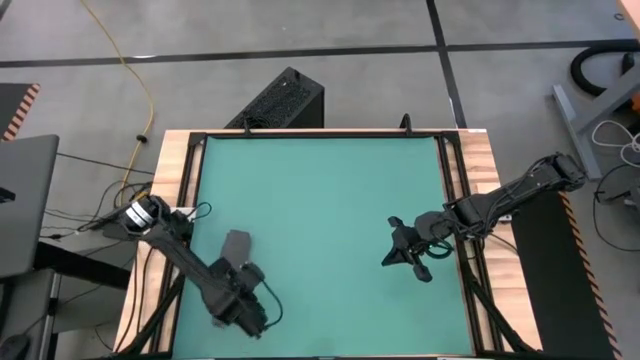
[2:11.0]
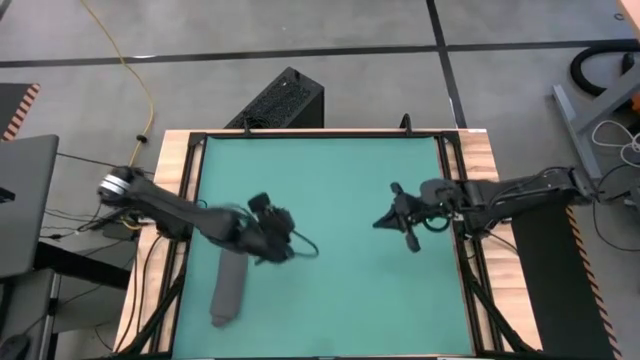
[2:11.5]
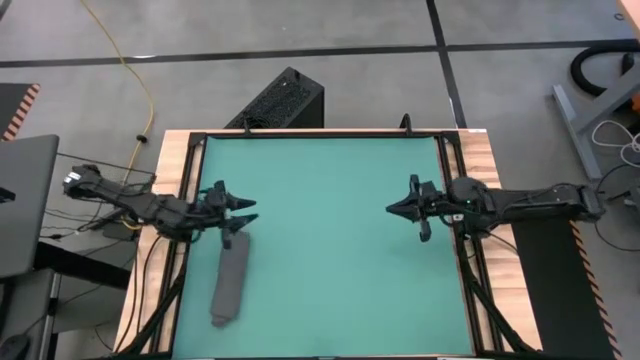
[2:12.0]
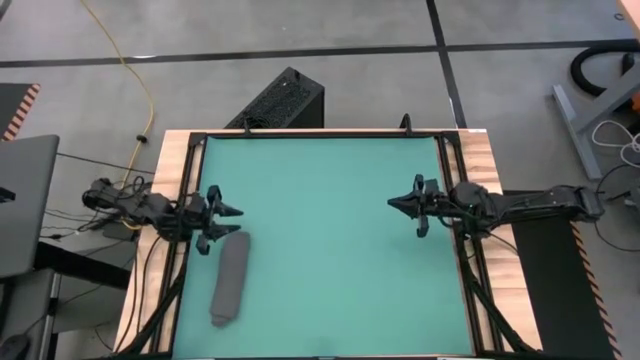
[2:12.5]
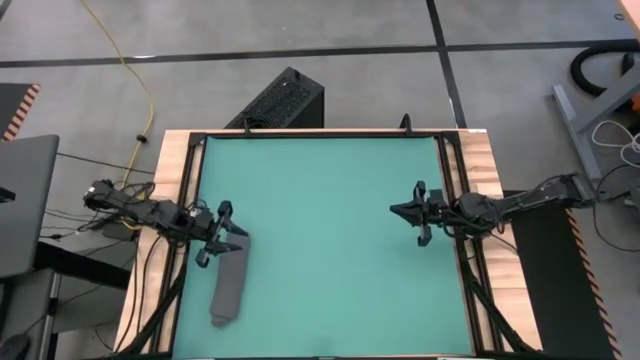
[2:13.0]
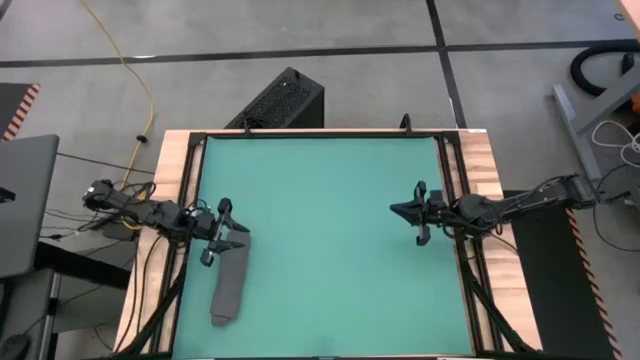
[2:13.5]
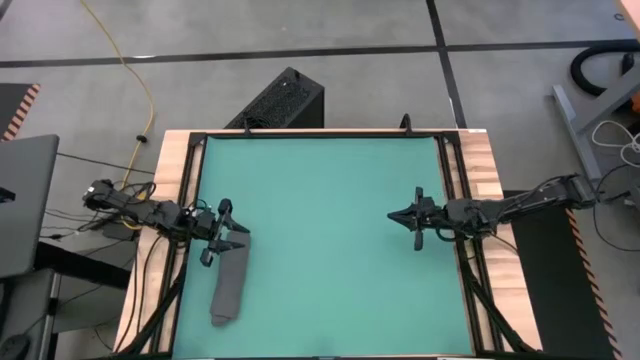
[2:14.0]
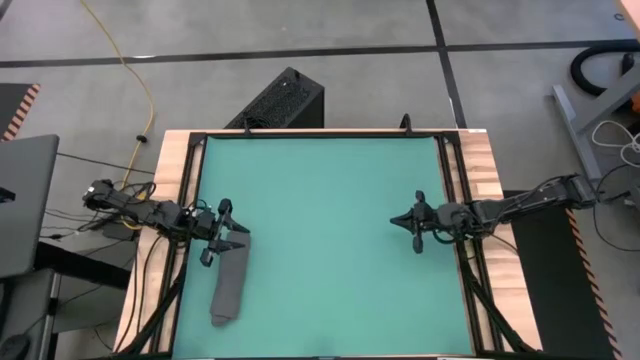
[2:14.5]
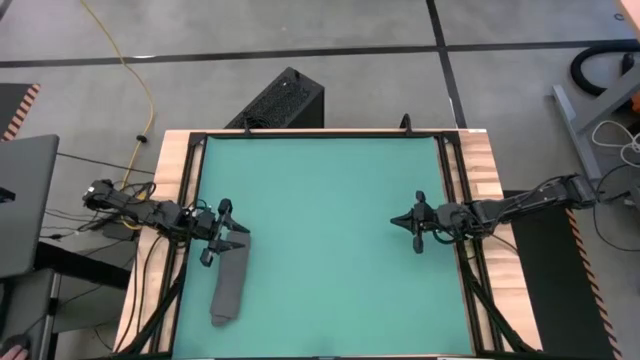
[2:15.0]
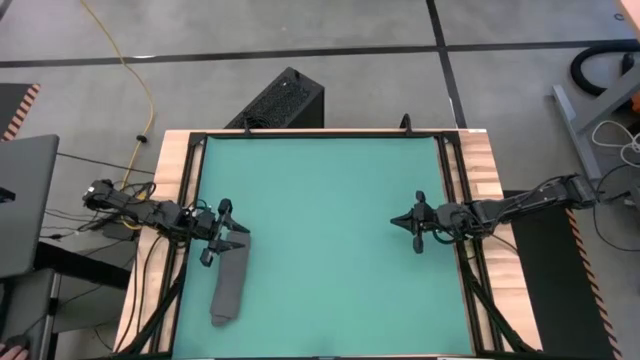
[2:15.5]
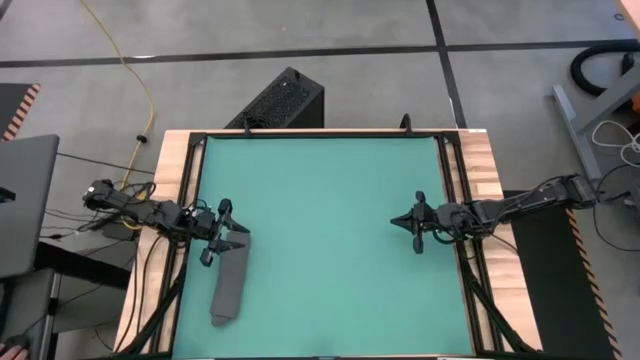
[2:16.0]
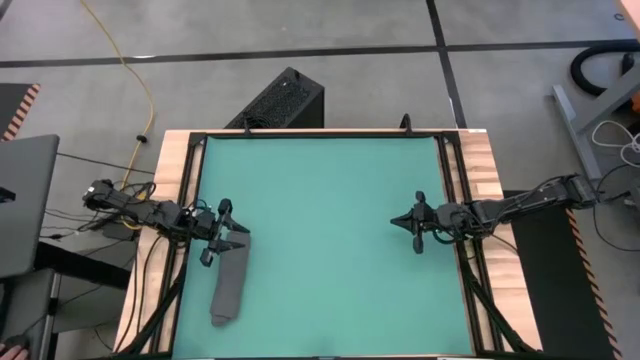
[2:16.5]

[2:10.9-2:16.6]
Task: Roll towel
Return to Home Position

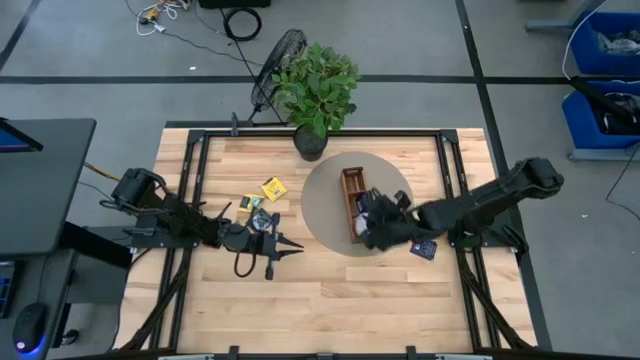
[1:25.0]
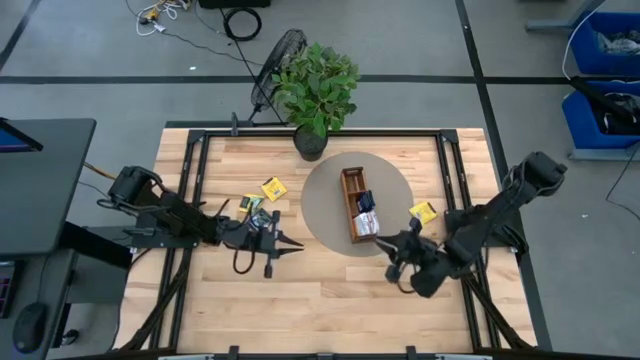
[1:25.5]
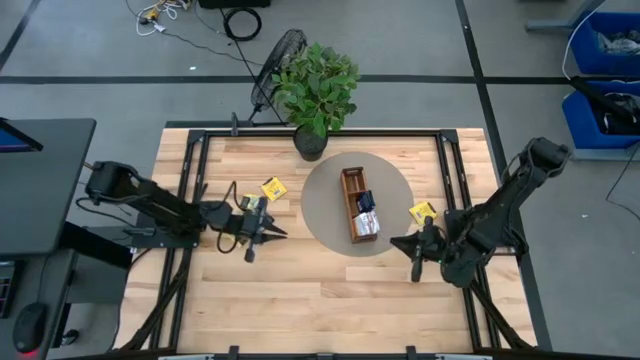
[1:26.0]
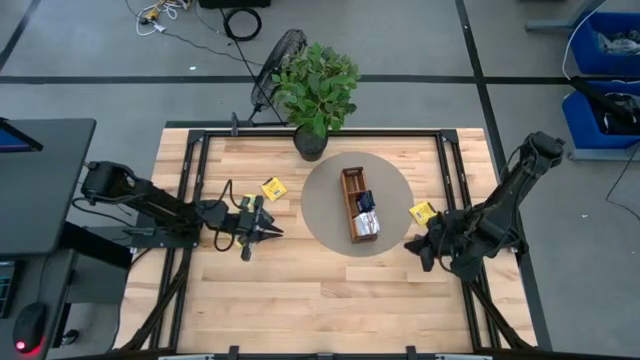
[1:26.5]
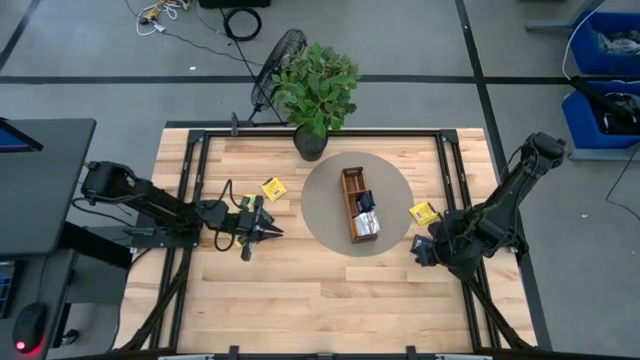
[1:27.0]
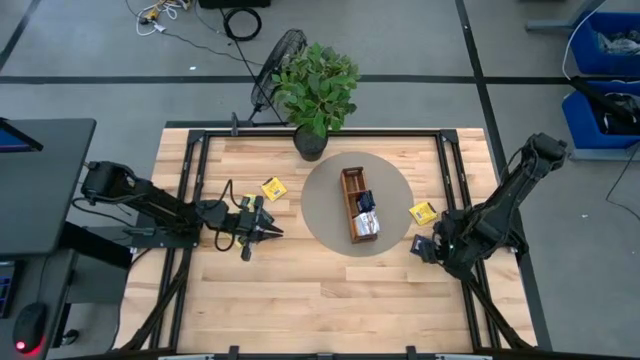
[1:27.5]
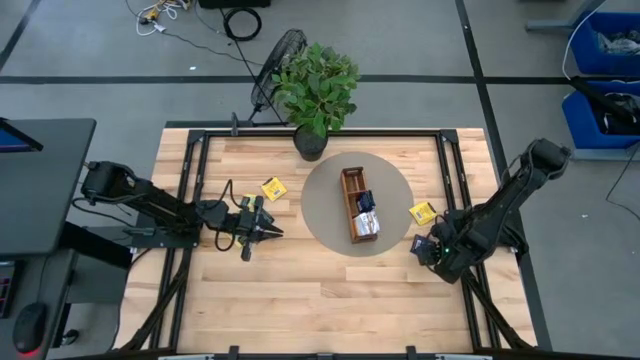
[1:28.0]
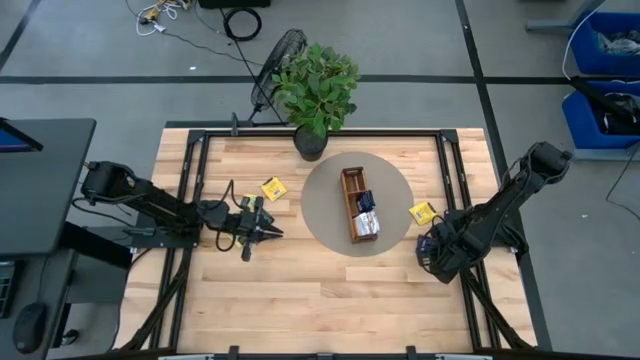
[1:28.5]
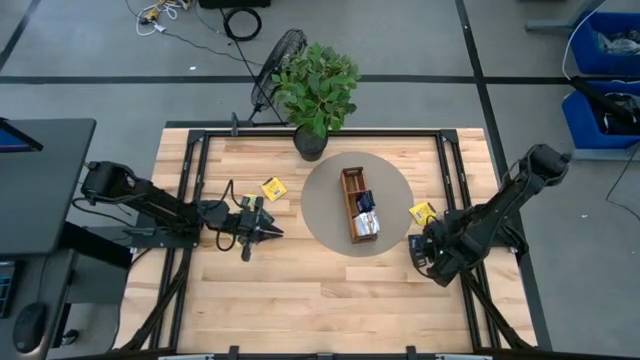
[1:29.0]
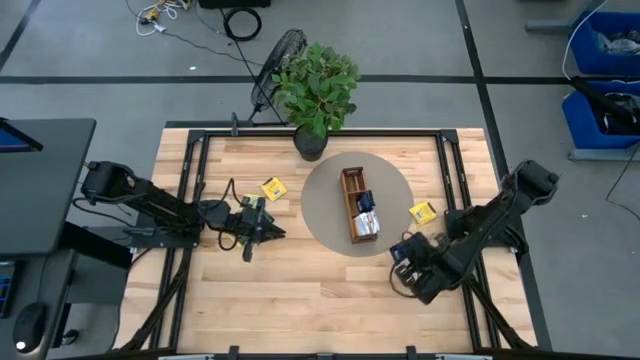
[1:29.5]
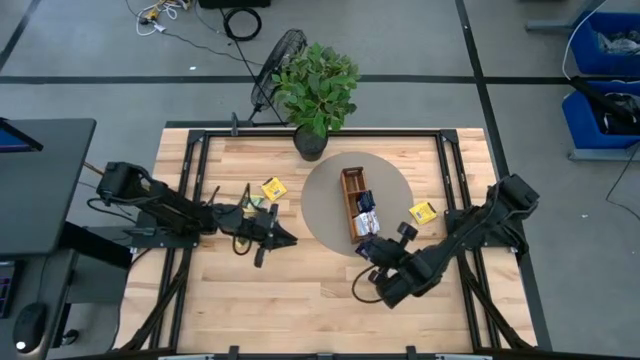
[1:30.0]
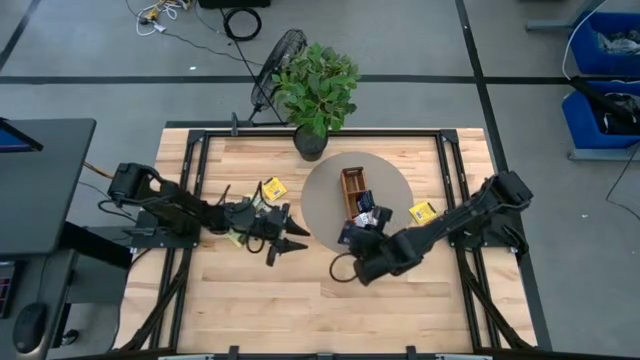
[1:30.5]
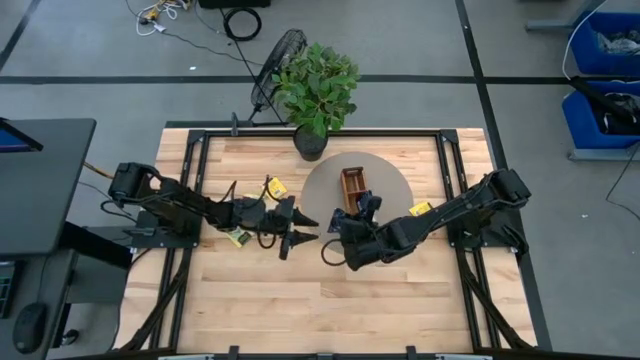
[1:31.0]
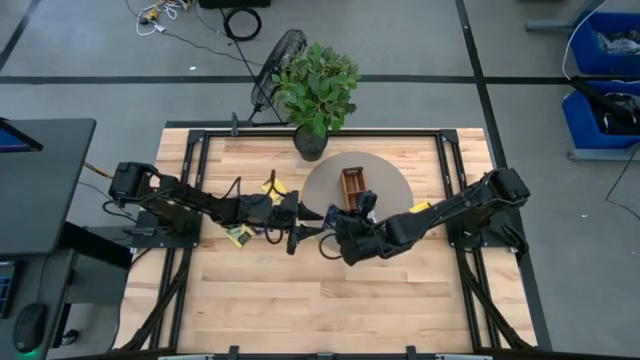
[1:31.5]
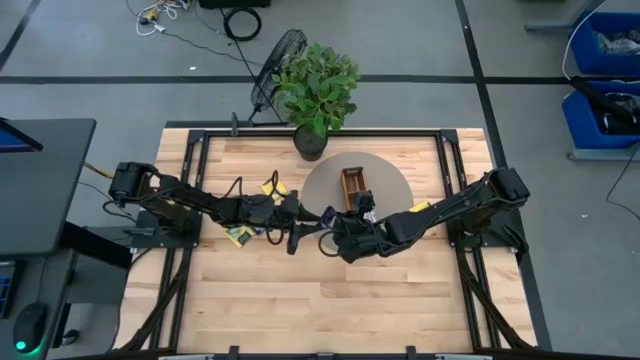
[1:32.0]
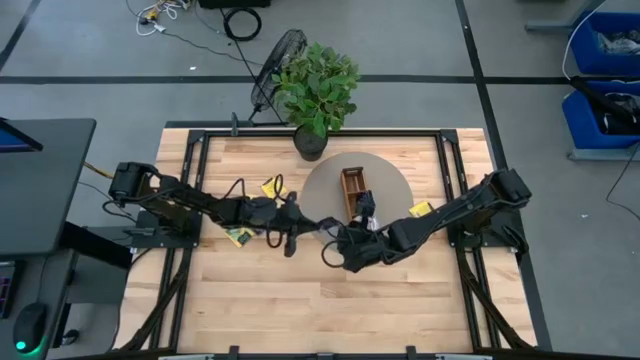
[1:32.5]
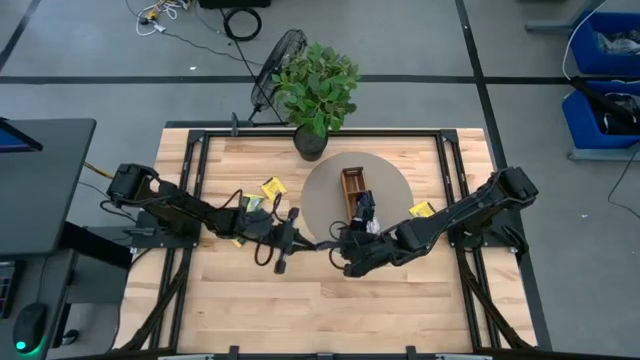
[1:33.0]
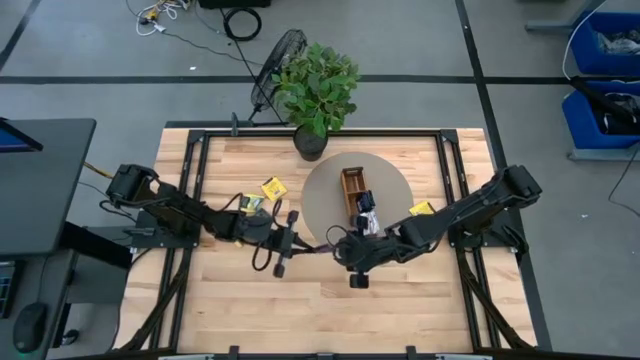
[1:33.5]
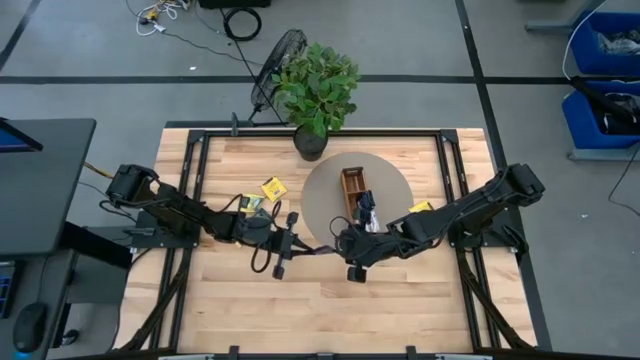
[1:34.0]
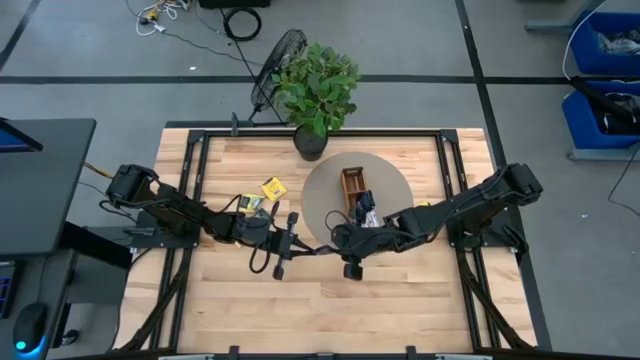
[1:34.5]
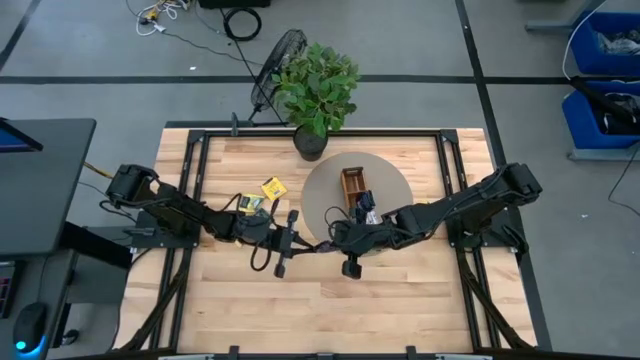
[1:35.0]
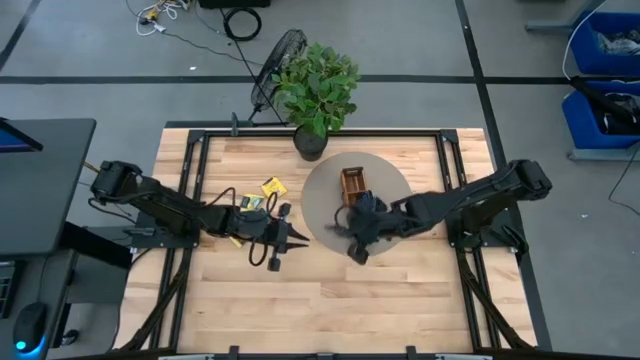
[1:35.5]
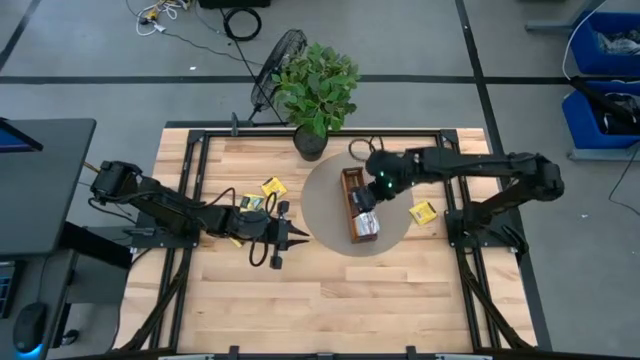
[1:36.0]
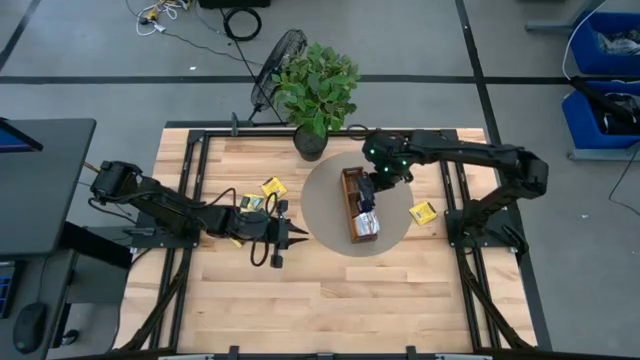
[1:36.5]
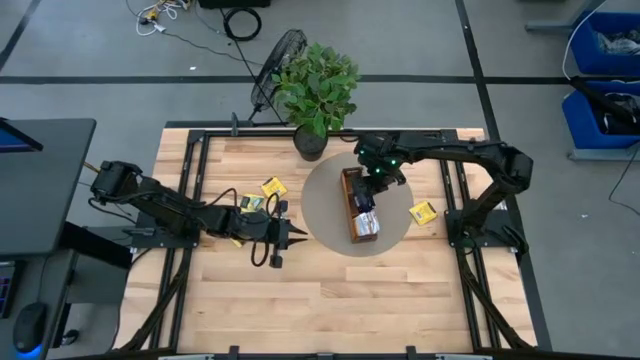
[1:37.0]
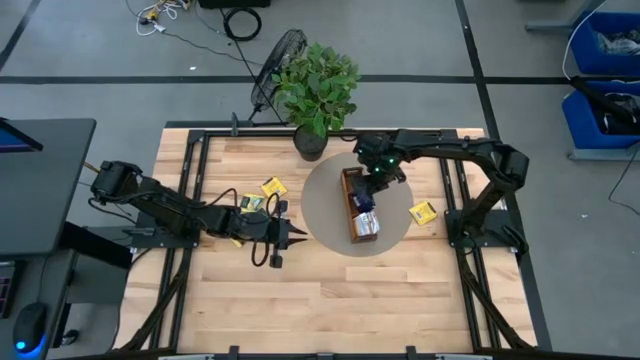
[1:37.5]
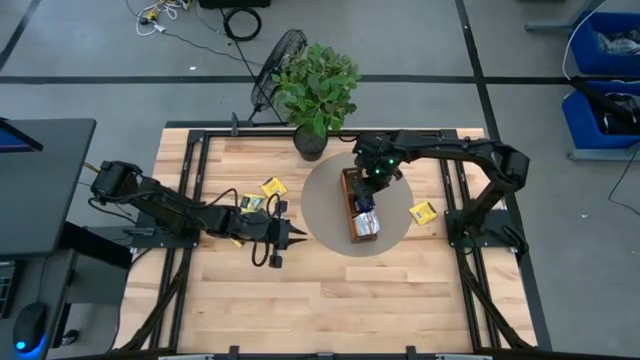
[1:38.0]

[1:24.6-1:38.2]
Task: Pick & Place Tea
Put the purple tea bag into the middle section of the wooden organizer
